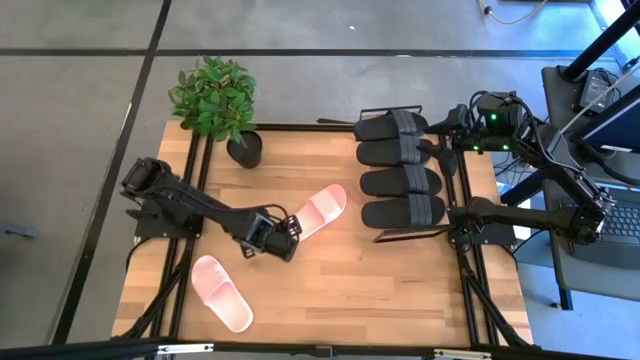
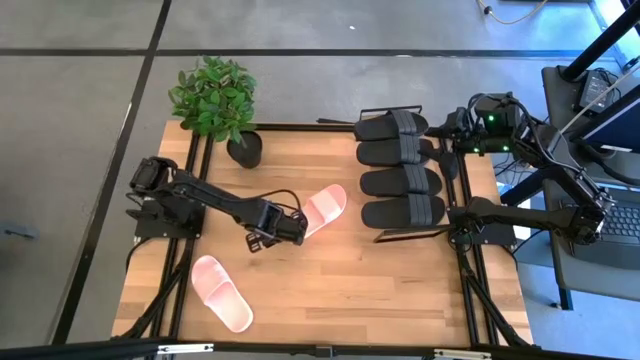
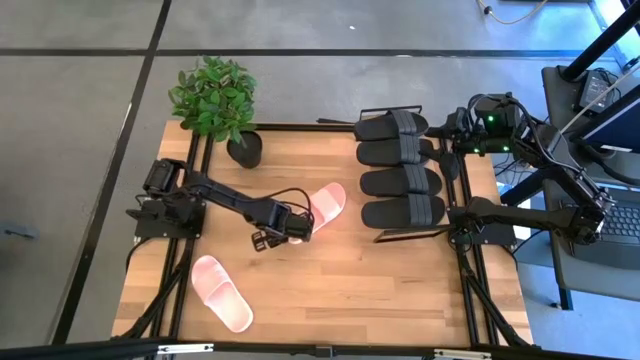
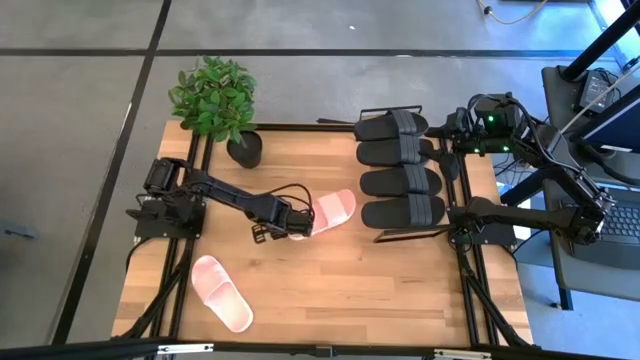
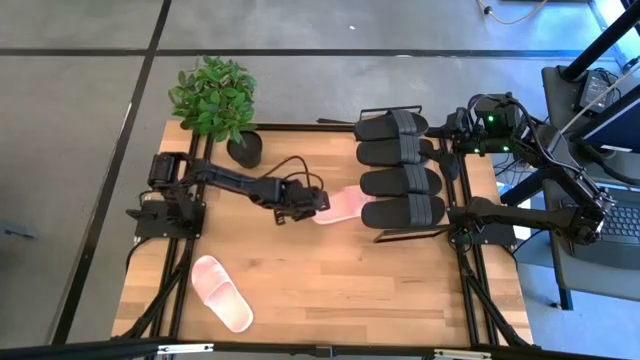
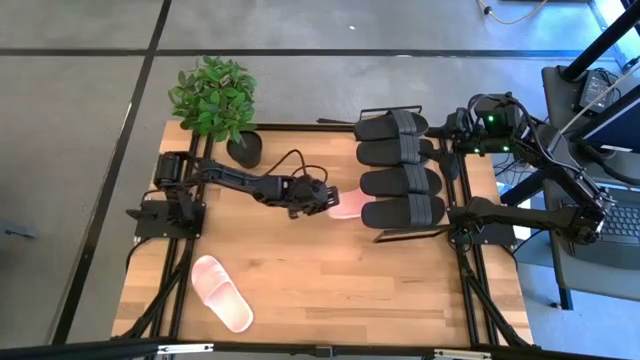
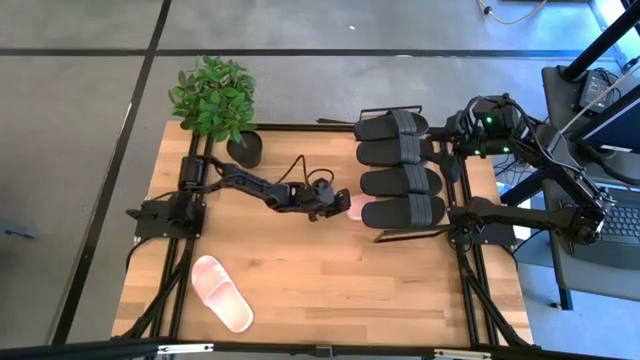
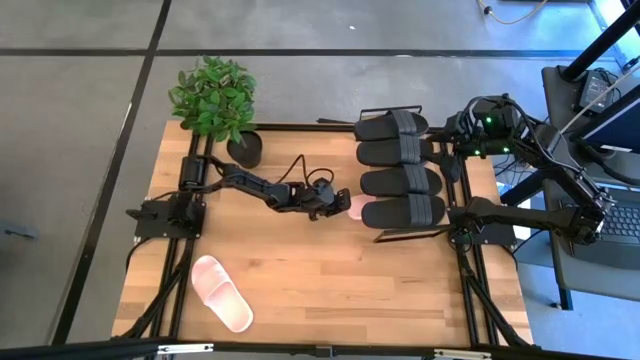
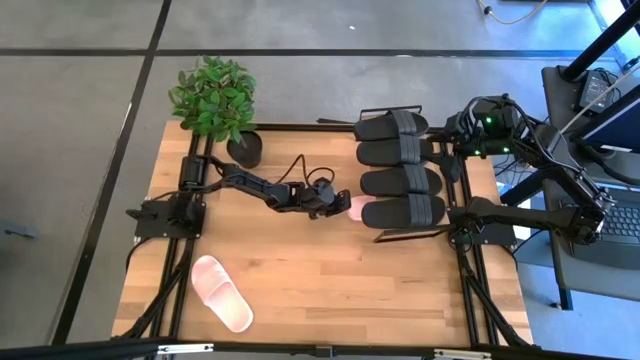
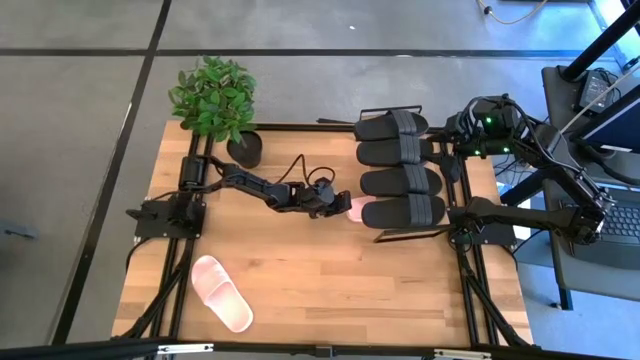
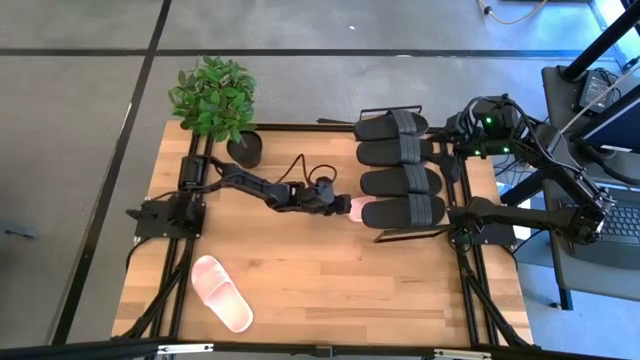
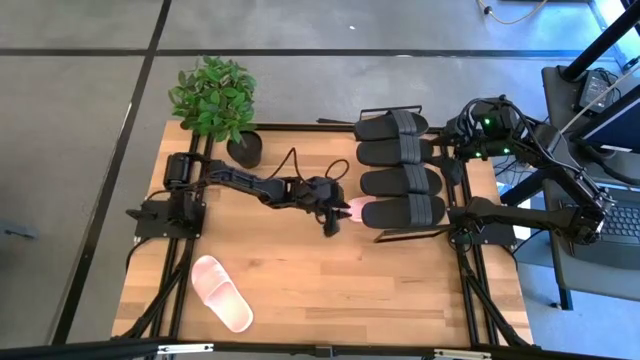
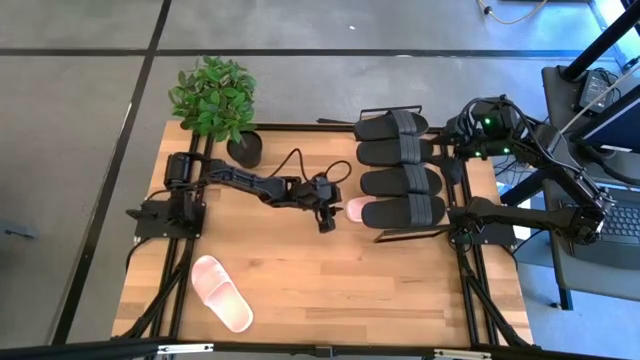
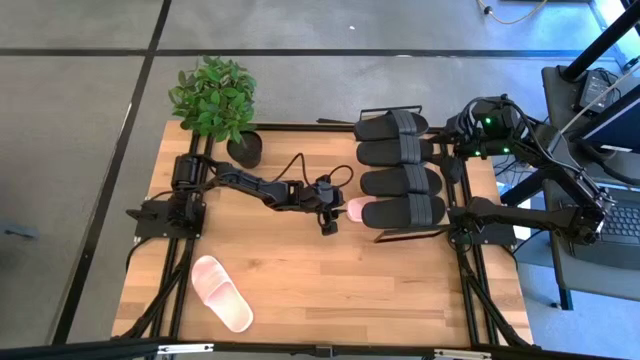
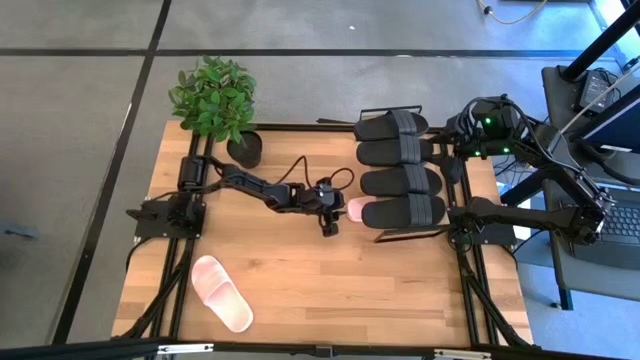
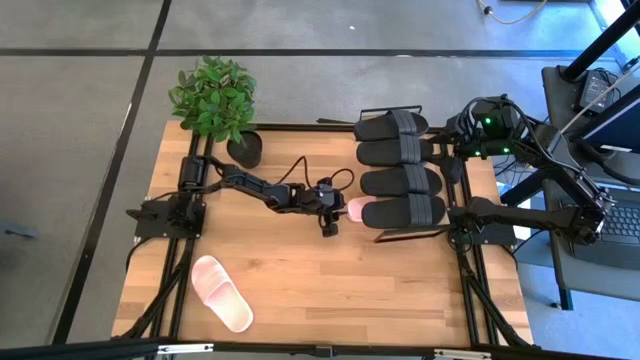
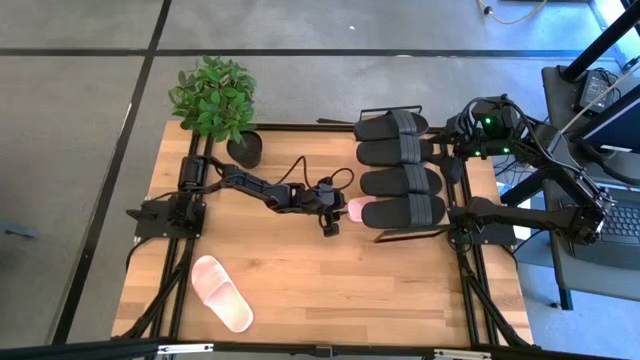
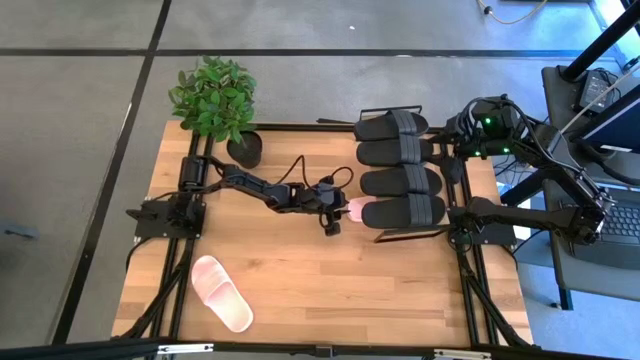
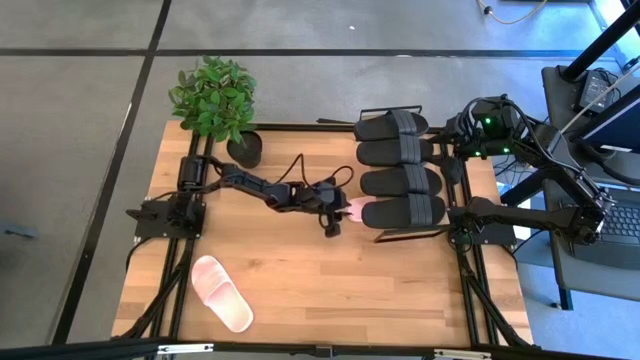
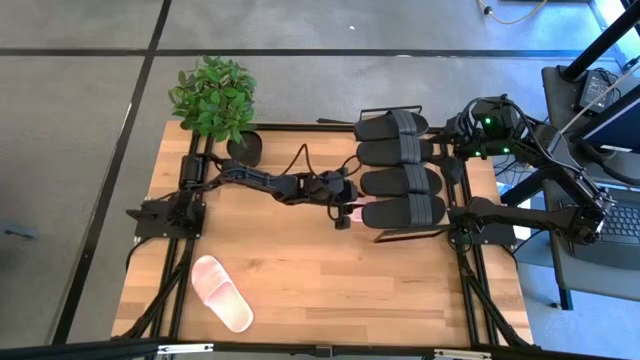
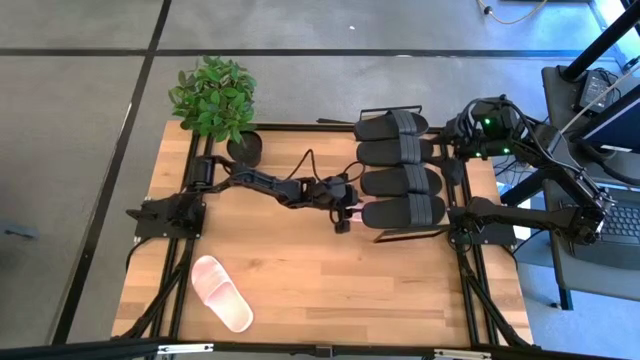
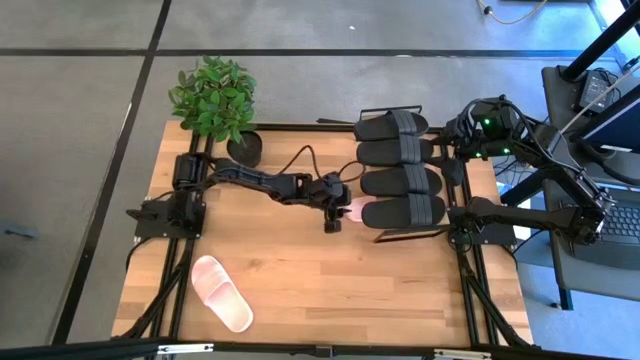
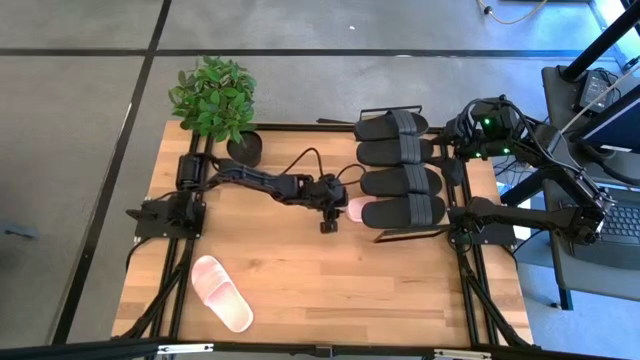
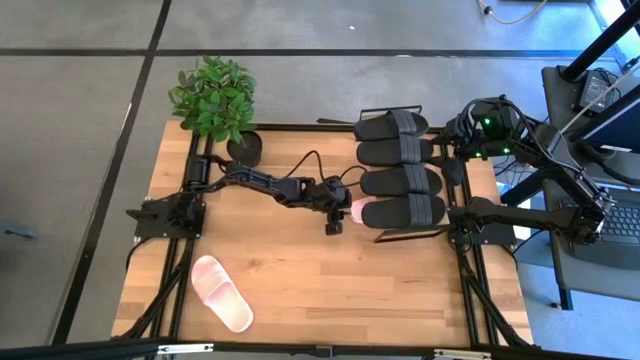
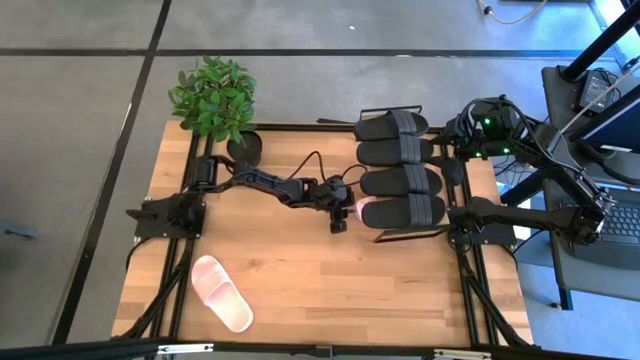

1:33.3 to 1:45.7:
Task: Pick and place slides into the shelf
Put the pink slide under the shelf

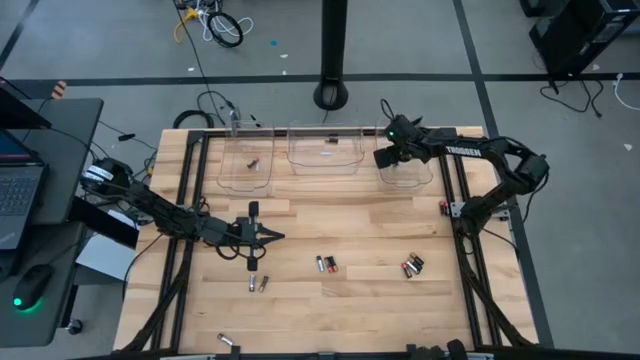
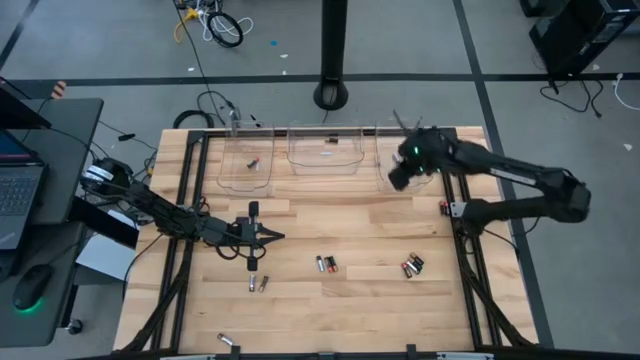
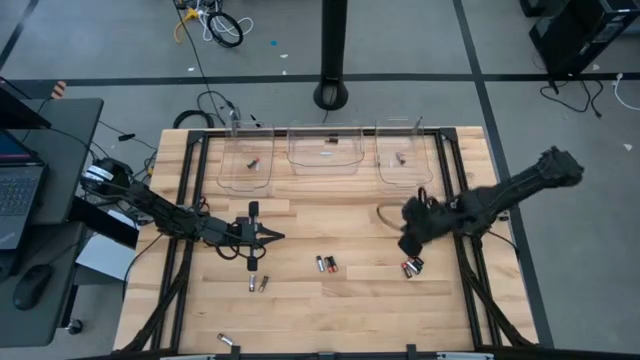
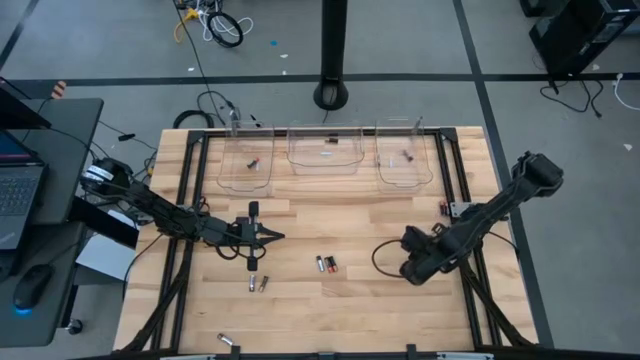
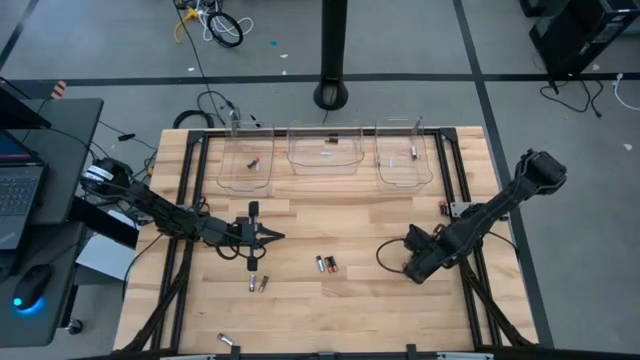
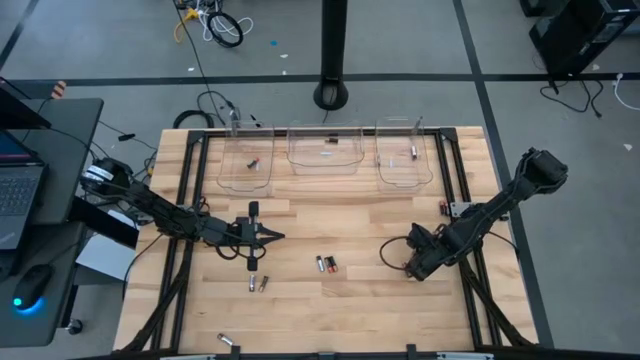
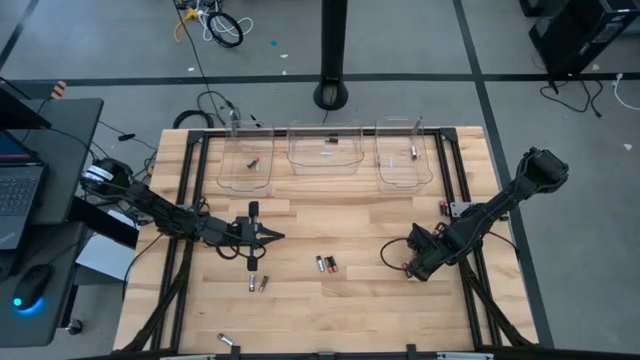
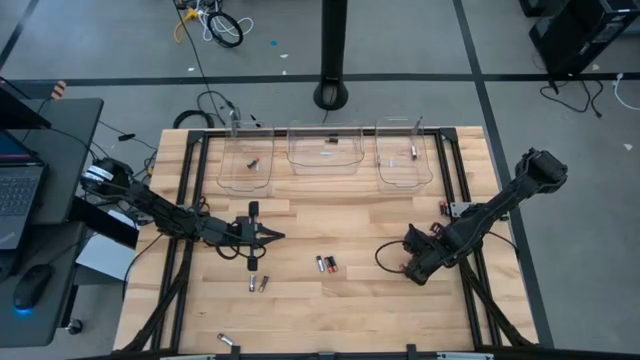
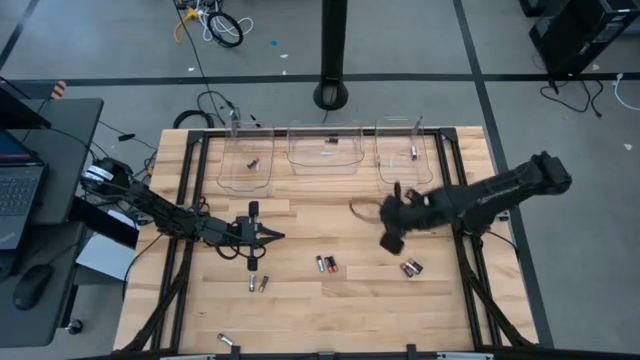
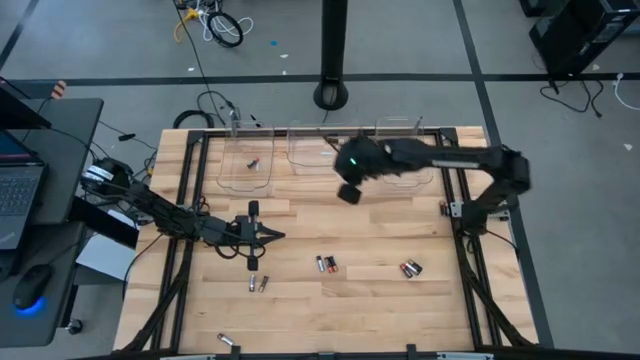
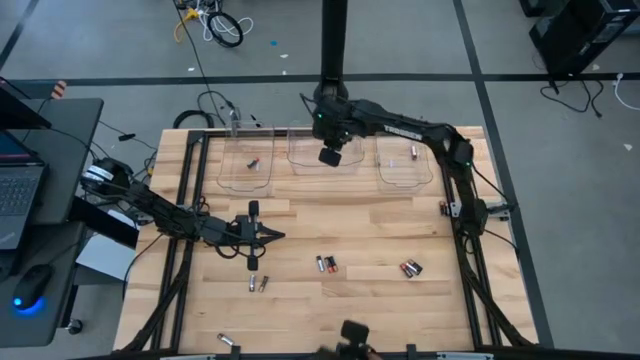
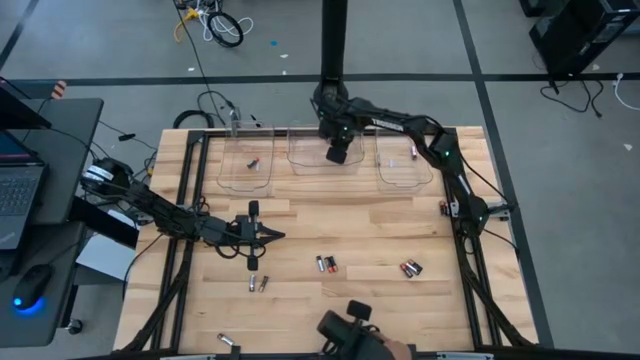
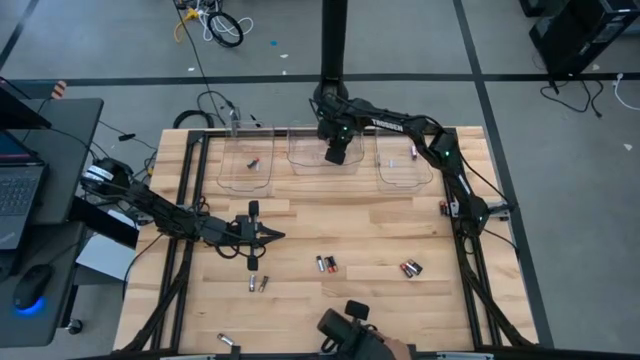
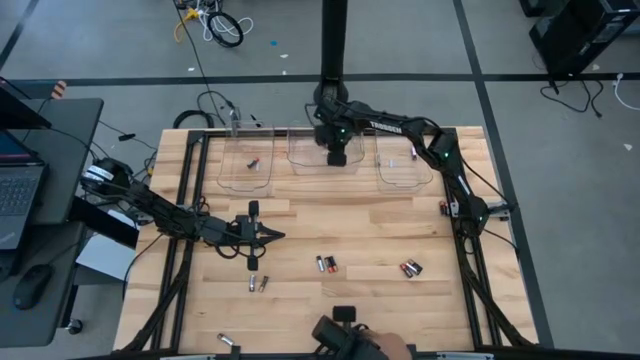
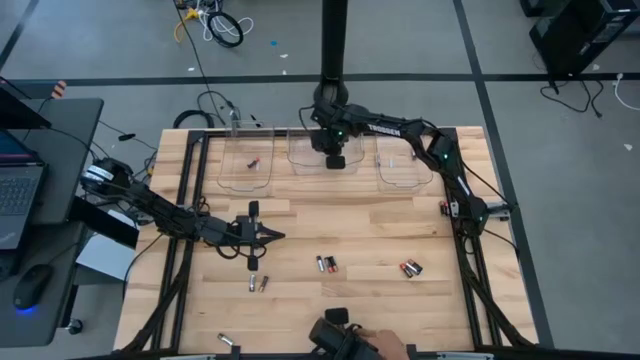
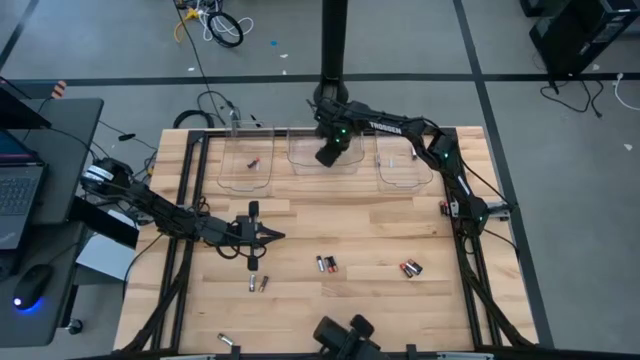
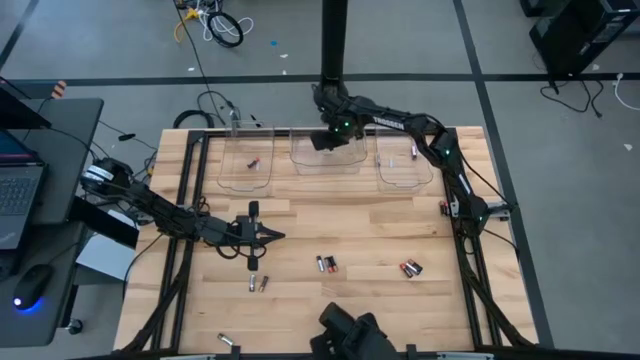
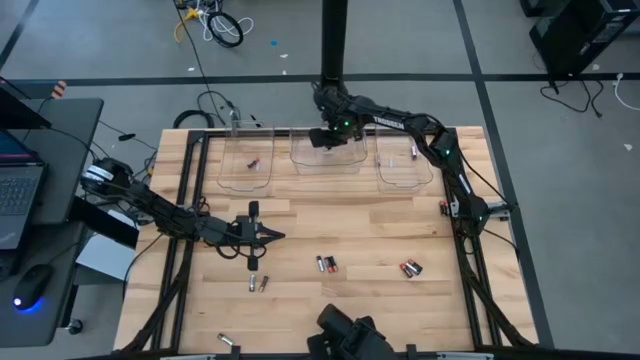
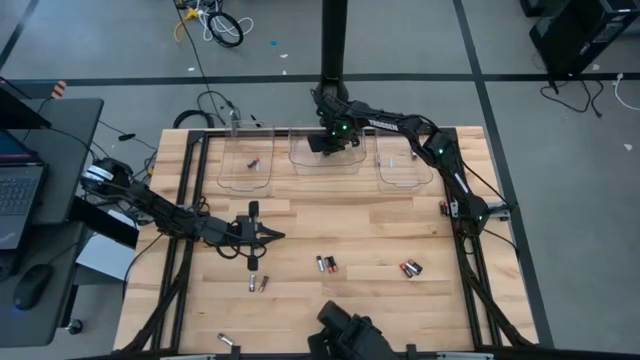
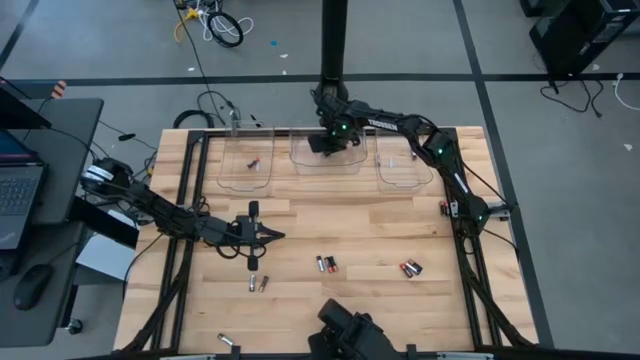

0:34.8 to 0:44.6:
Task: Sort batteries
Put the black battery into the middle transparent bin
